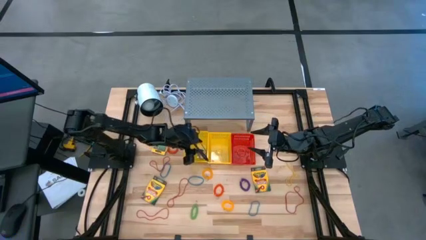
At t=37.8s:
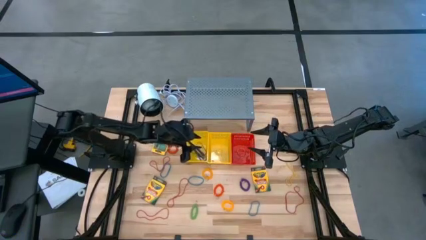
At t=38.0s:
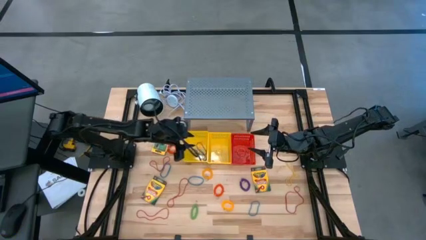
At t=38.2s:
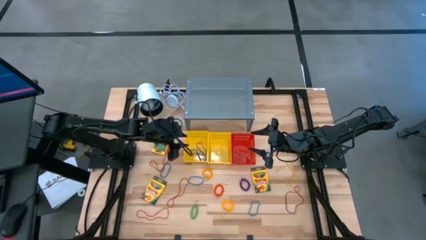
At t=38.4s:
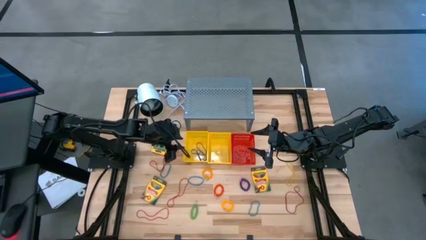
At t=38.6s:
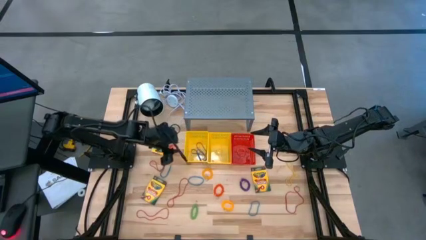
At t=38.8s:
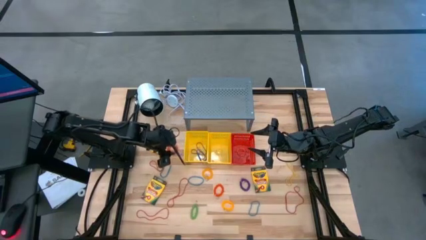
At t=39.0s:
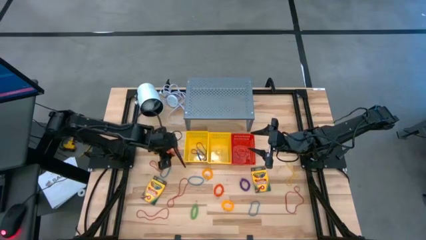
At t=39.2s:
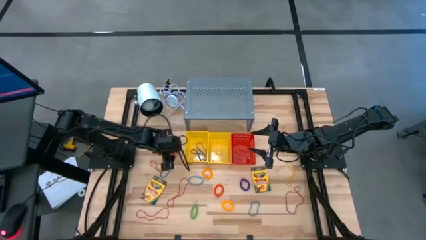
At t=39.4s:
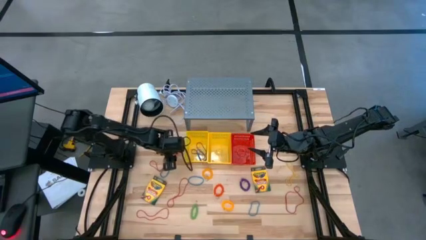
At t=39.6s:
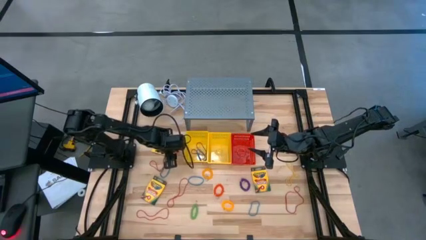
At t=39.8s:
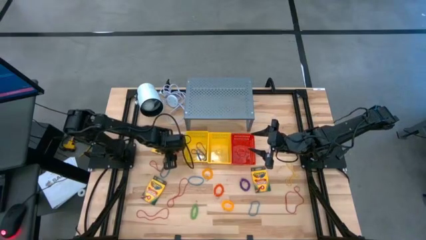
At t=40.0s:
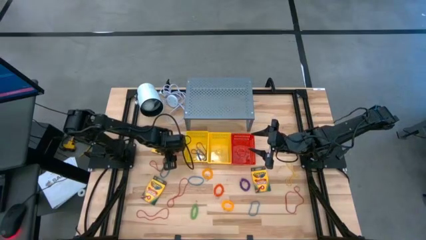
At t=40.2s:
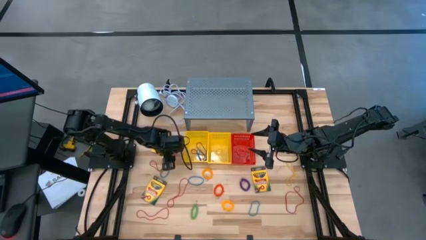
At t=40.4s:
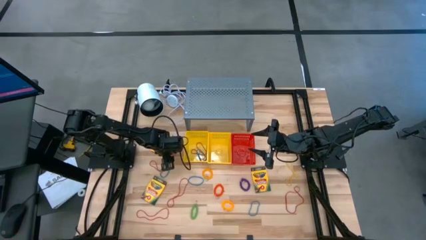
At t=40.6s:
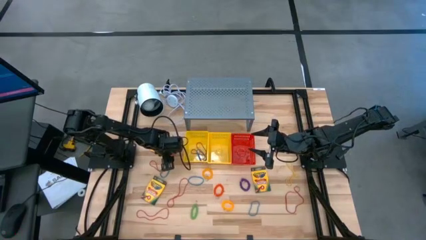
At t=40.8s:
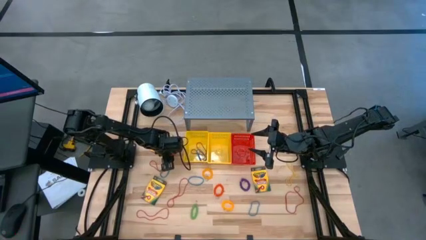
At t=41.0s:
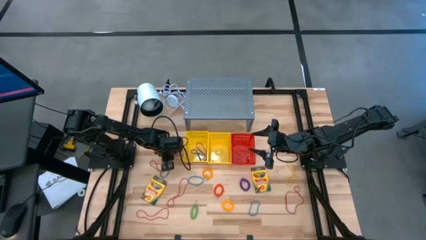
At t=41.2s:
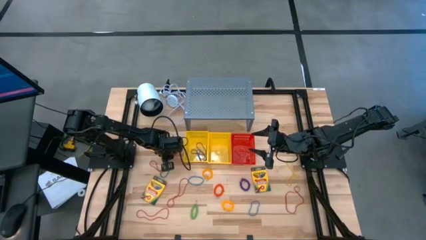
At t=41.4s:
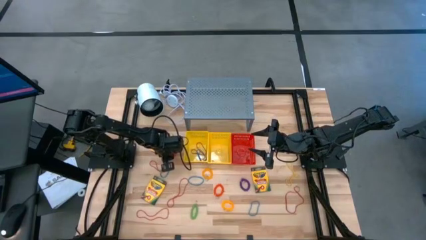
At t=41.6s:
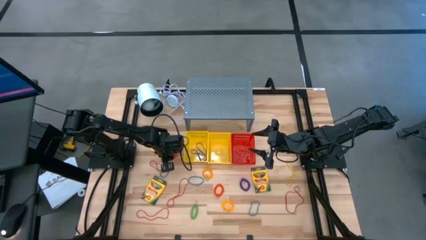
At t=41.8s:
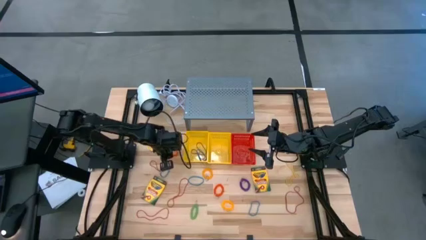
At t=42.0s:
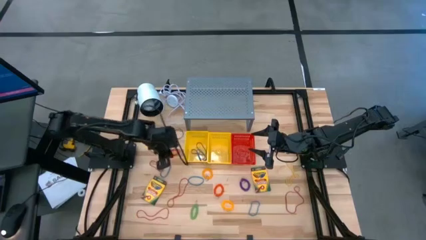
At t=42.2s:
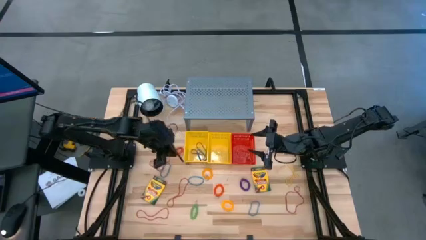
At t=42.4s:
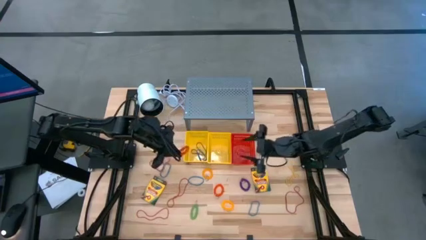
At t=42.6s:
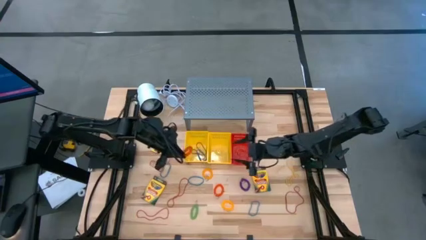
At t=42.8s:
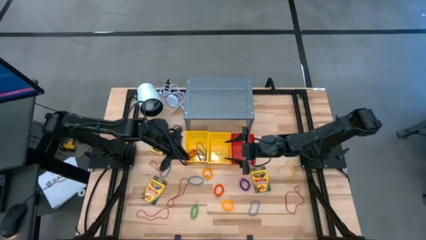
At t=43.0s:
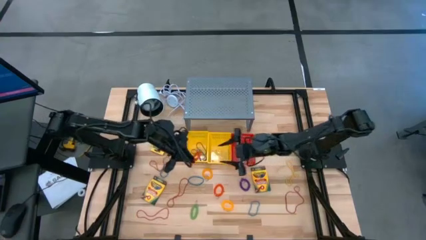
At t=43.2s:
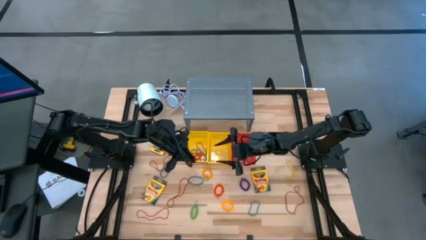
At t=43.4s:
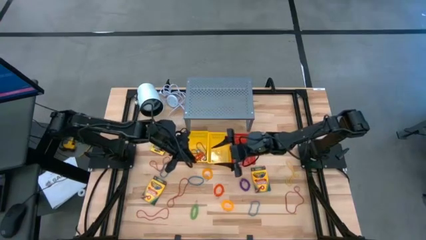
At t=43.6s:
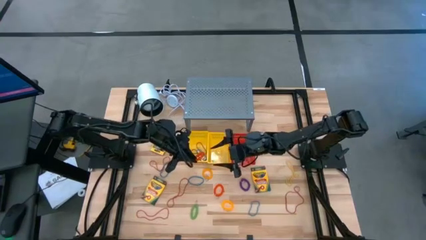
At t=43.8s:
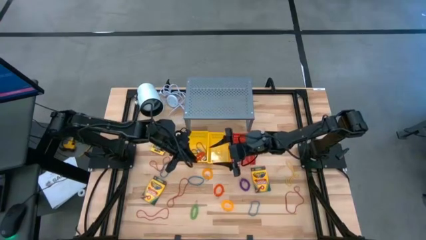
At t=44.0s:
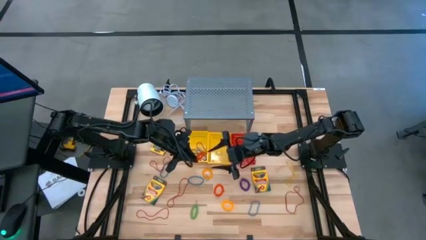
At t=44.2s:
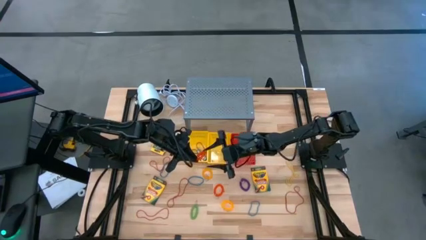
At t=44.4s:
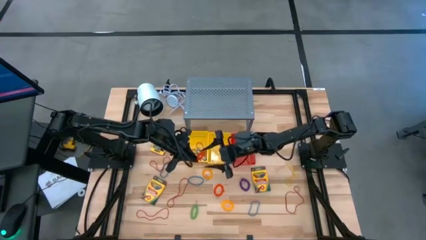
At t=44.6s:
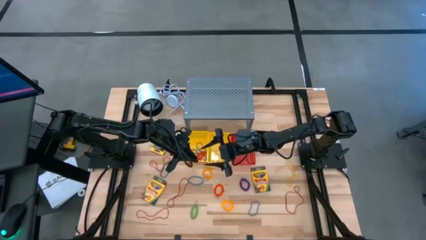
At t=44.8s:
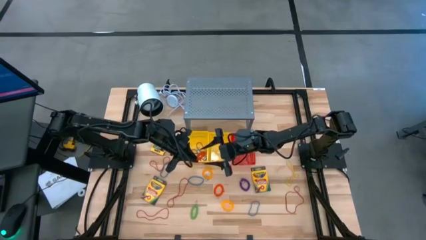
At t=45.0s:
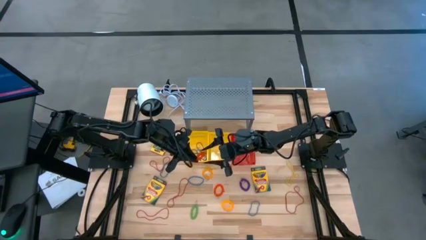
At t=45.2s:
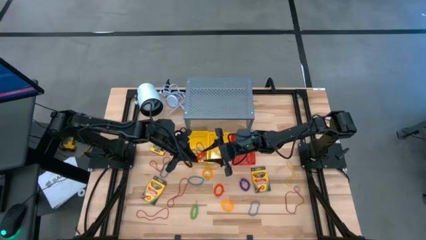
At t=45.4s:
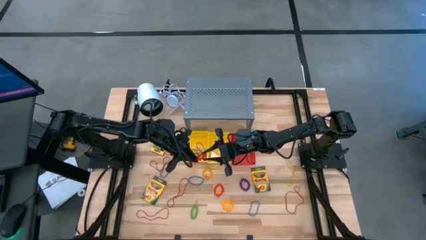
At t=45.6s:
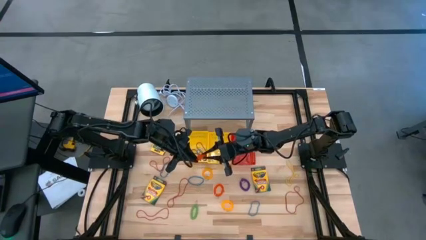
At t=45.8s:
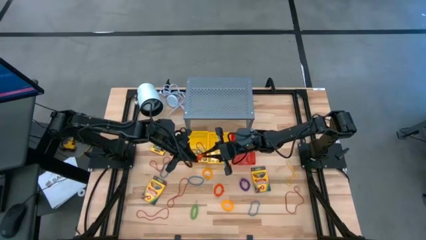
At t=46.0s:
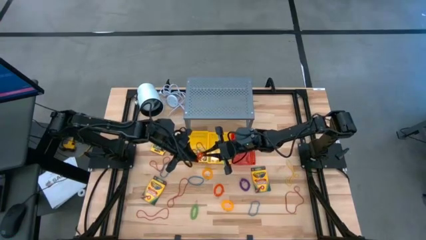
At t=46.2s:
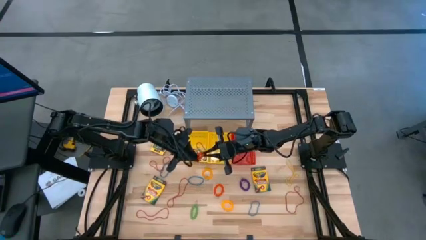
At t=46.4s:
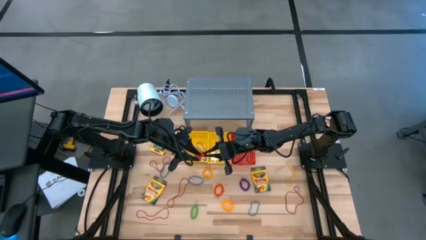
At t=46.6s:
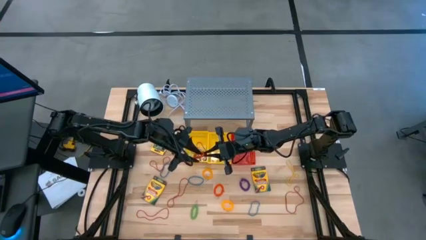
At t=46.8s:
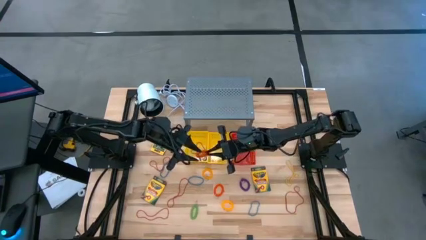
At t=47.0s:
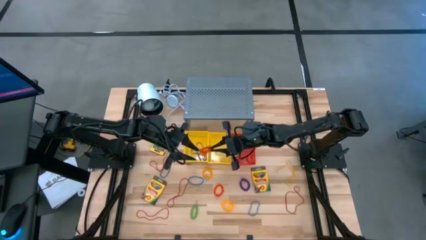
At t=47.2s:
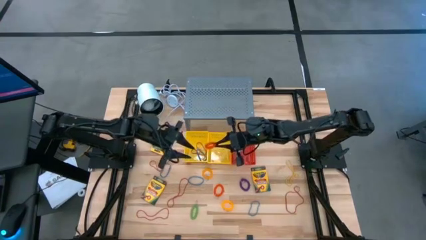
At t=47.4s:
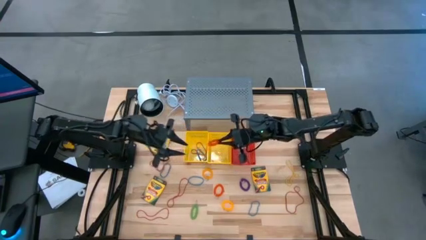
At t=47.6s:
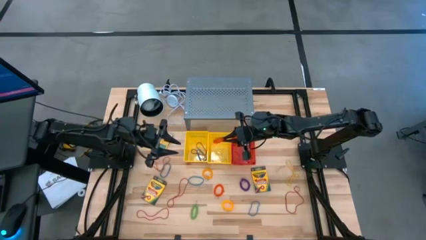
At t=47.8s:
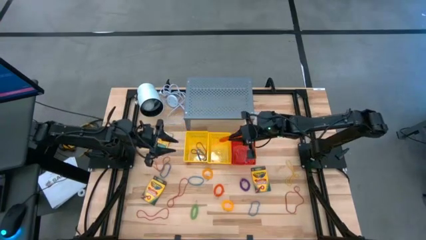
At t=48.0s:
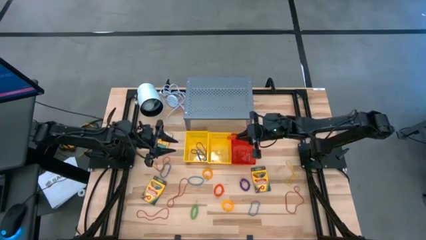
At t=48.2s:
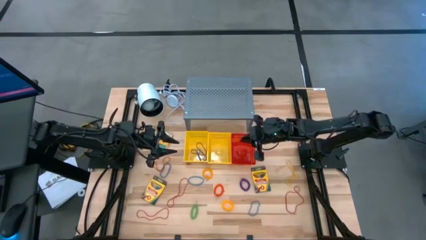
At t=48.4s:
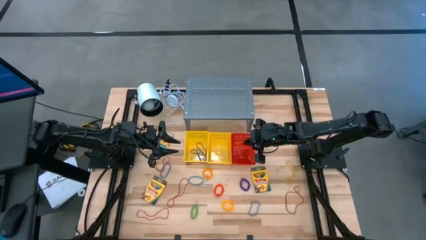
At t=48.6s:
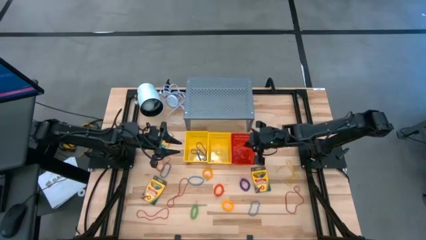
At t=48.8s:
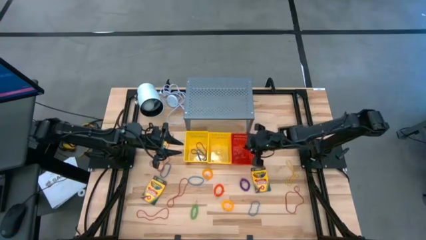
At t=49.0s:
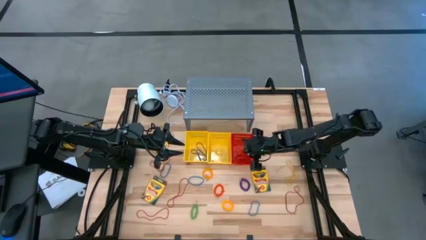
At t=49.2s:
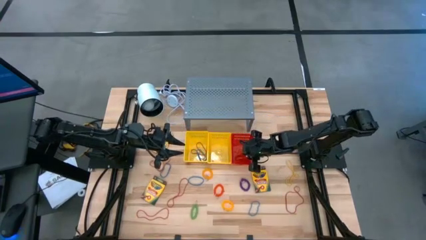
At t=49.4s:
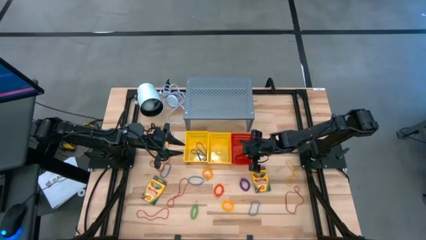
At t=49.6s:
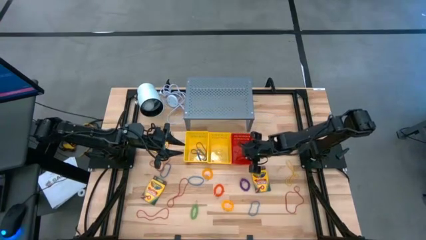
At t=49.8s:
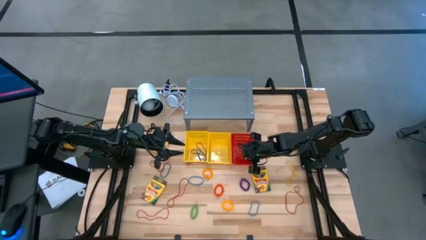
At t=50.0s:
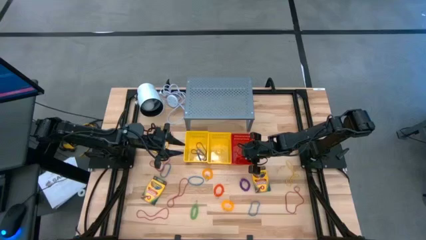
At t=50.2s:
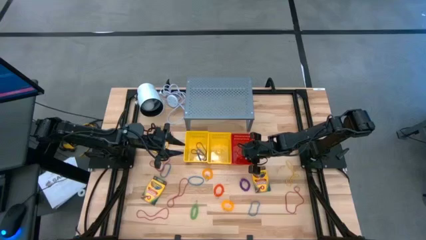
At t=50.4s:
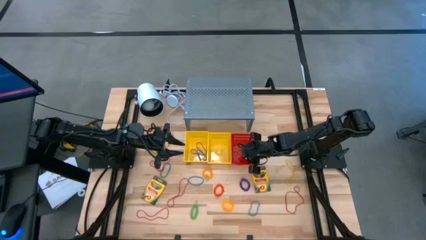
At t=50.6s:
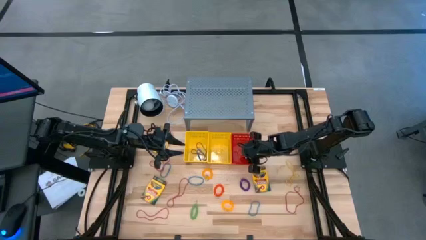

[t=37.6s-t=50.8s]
Task: Pick & Place Office Desk Supplies
Put the orange spring keychain into the red basket
